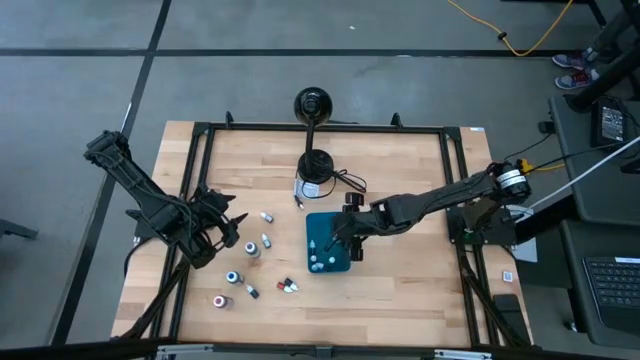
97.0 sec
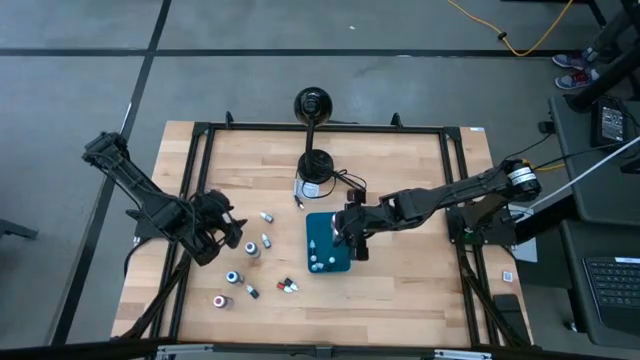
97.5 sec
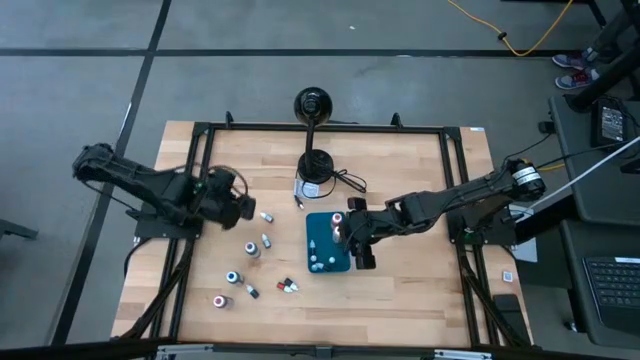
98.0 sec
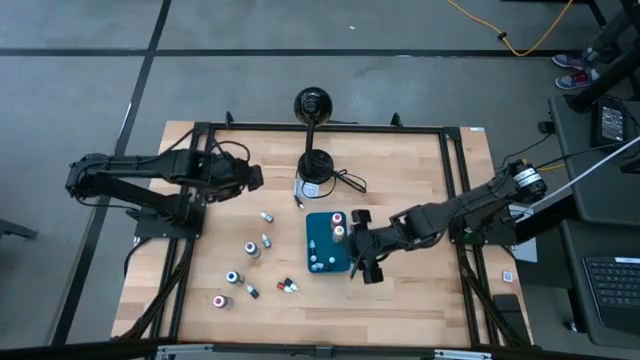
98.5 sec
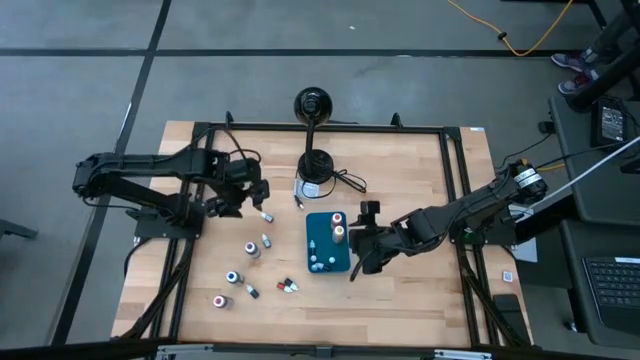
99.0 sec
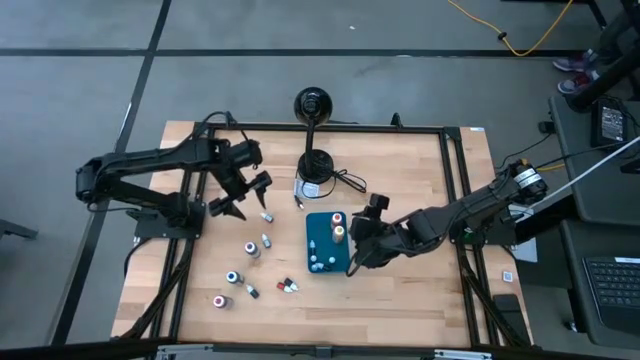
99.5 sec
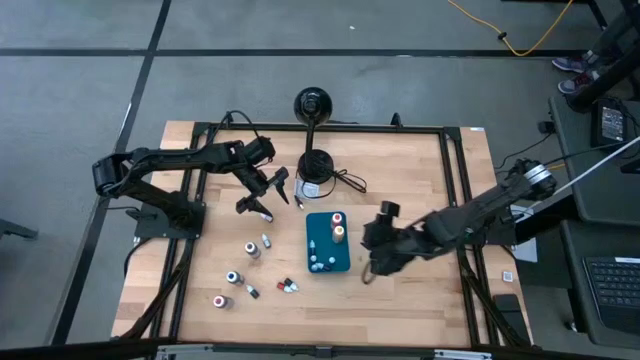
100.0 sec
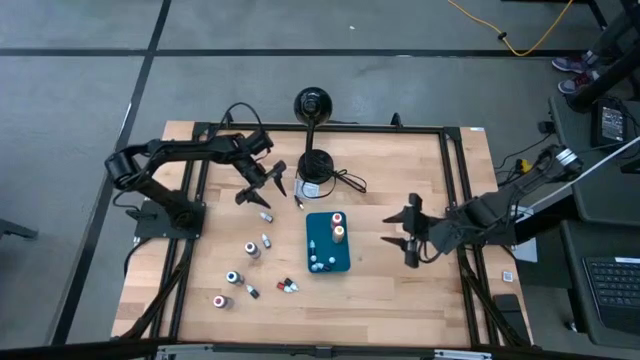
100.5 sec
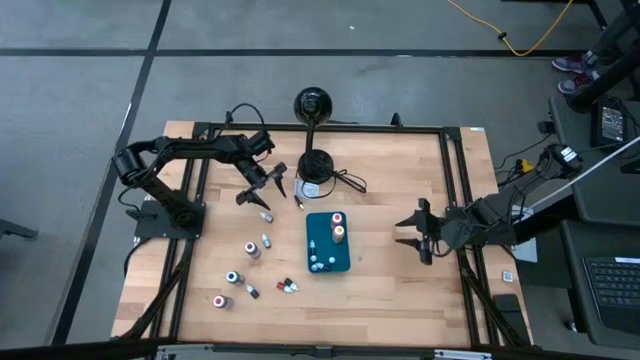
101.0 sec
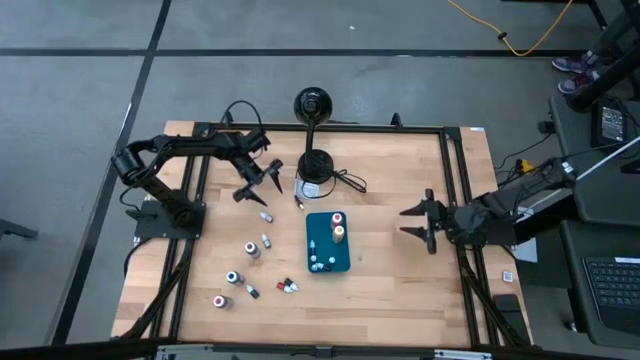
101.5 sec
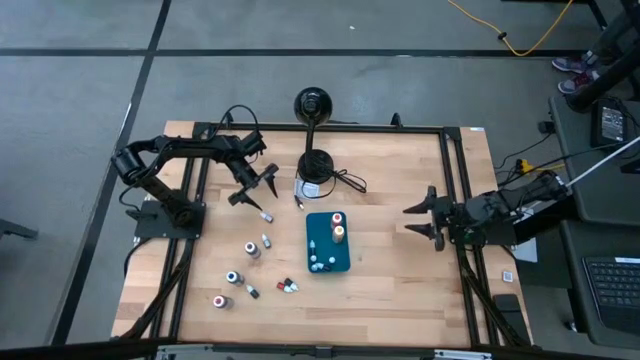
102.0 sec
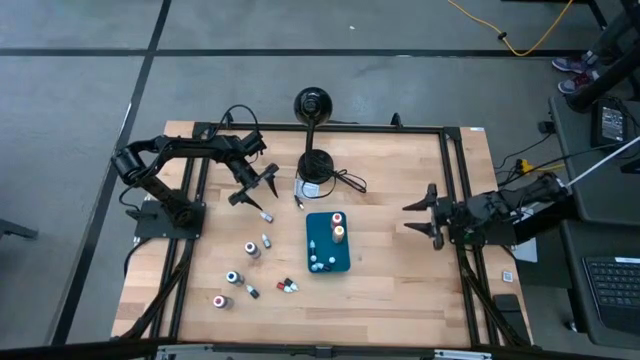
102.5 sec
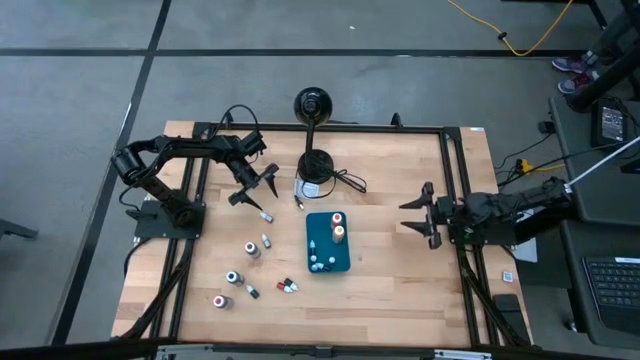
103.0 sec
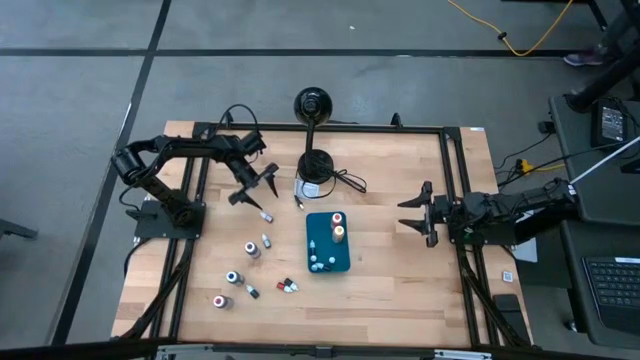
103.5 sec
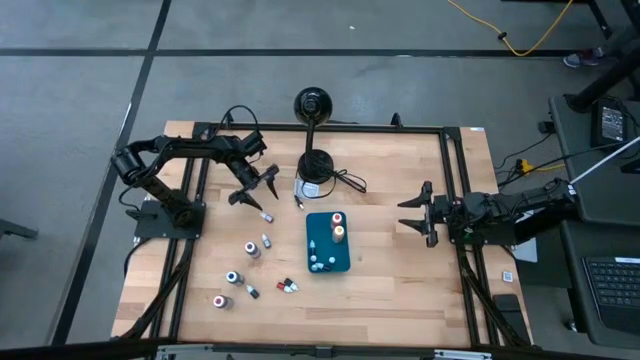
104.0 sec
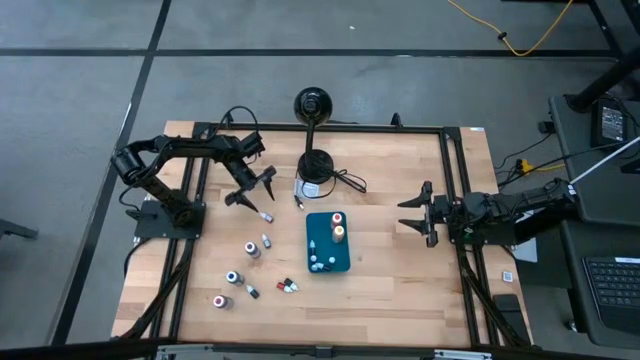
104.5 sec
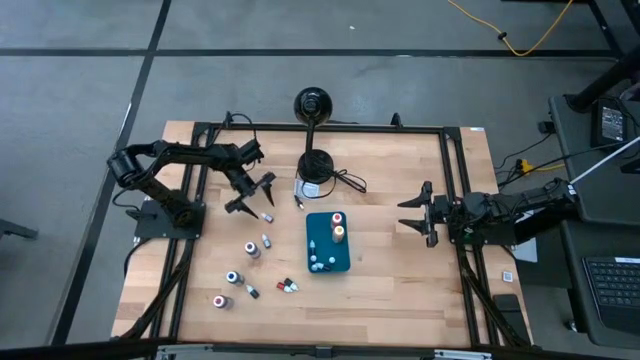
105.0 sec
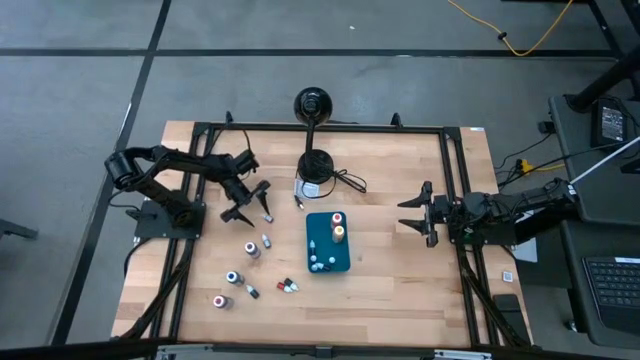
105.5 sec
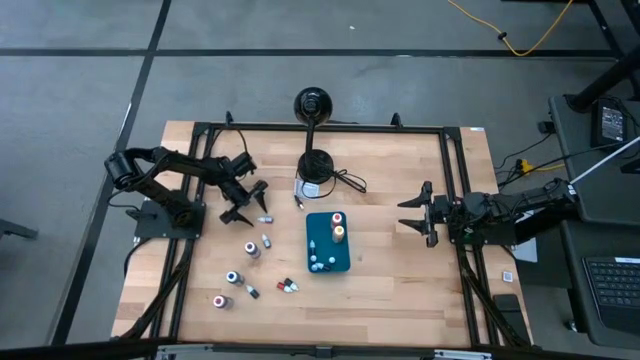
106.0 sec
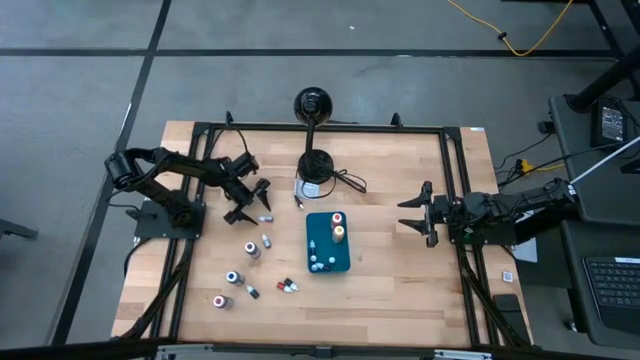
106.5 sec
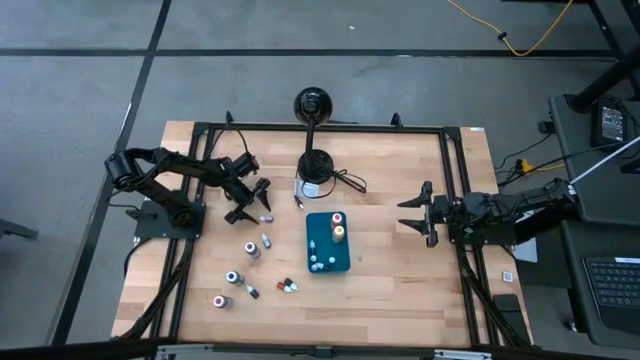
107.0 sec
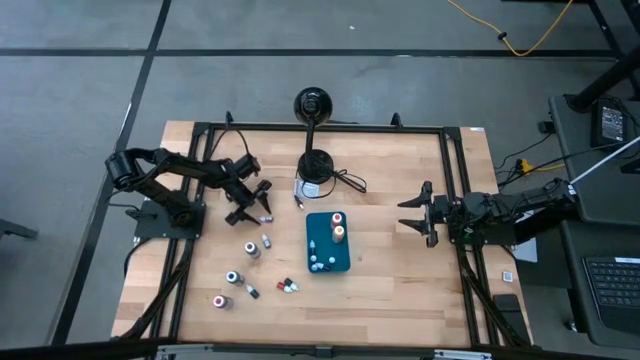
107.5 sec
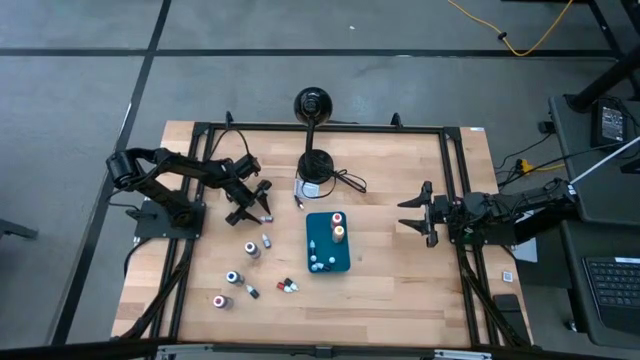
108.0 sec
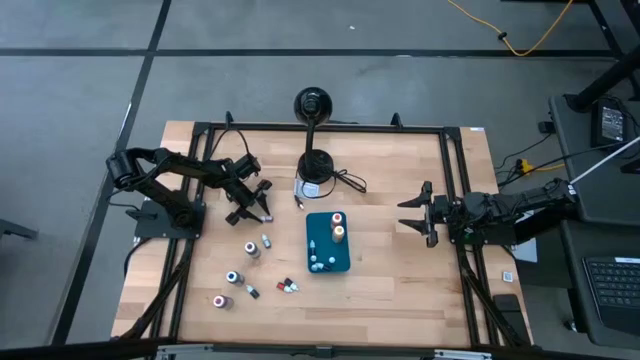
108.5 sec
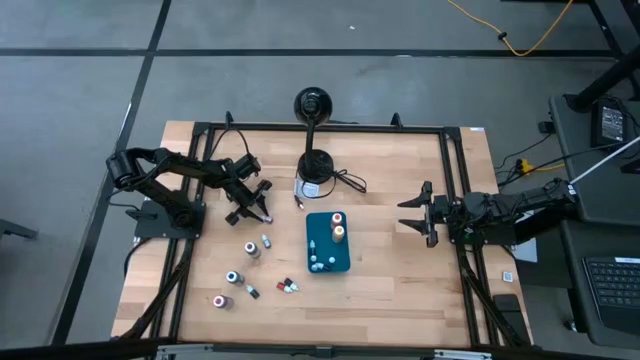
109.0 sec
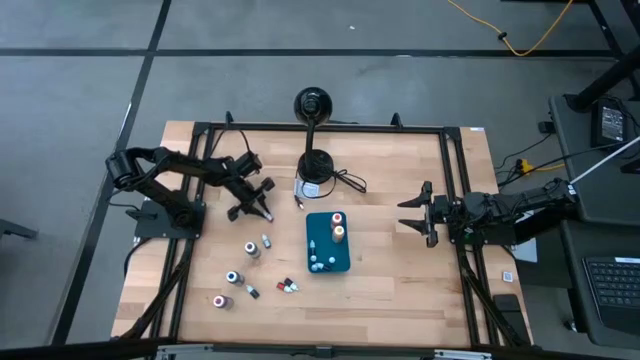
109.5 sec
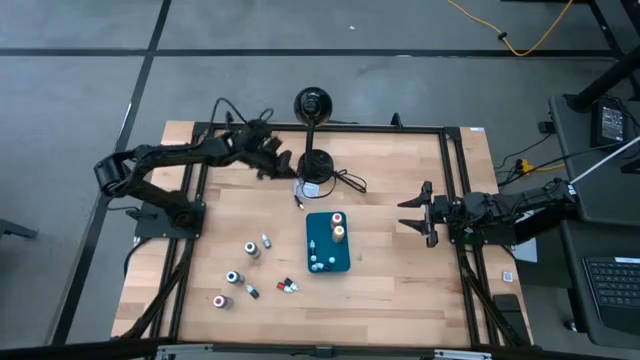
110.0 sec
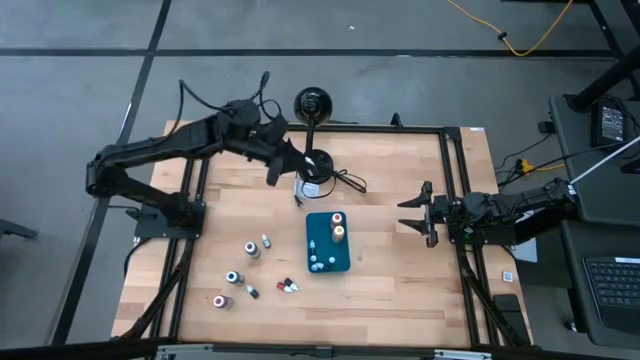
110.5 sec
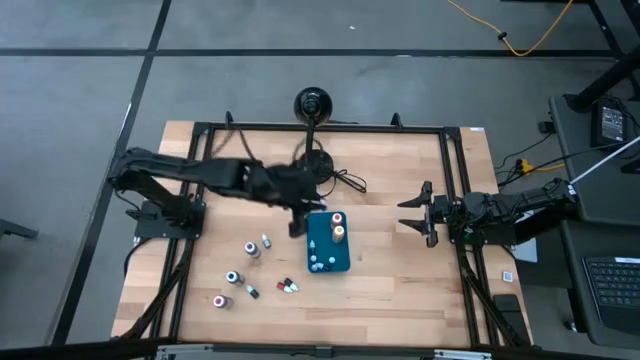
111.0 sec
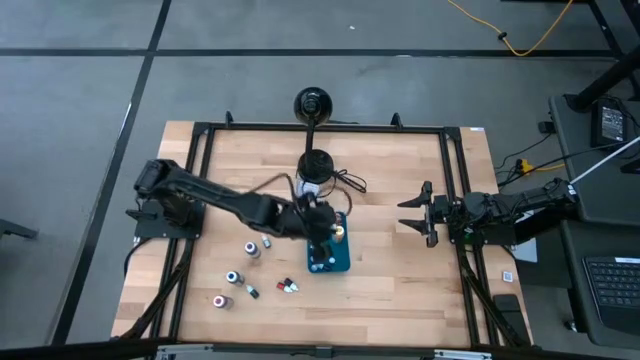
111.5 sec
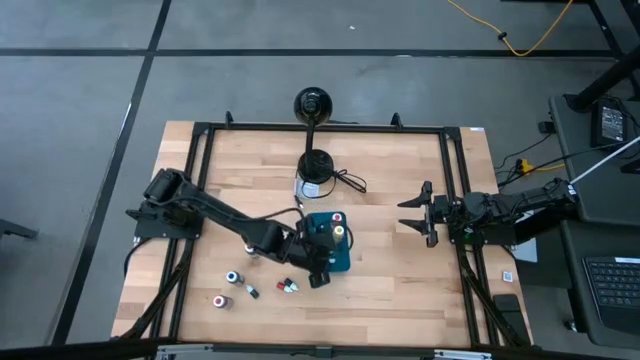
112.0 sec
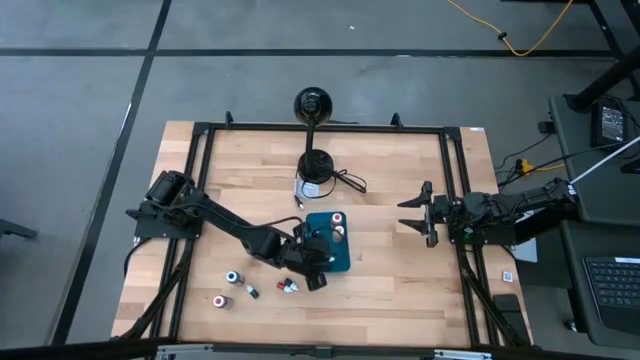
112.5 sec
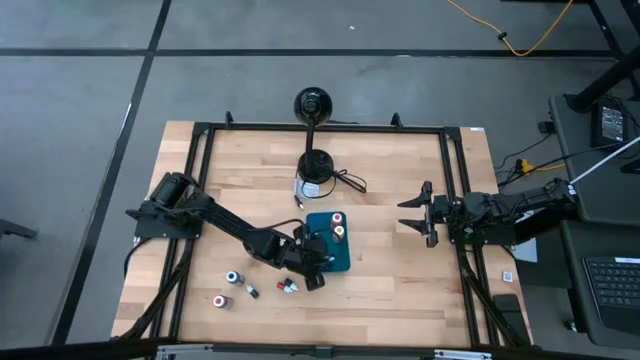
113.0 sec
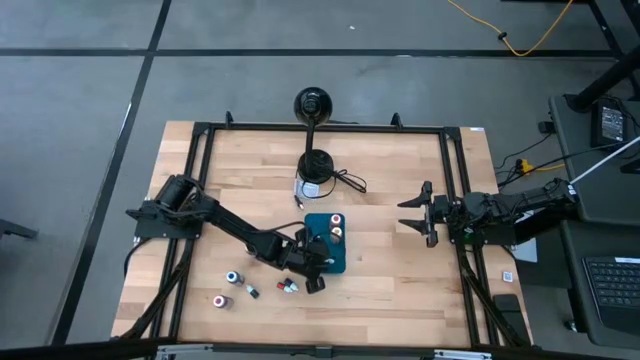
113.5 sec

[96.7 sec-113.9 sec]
Task: Pick & Place food coloring
Put the top red small food coloring bottle into the bin

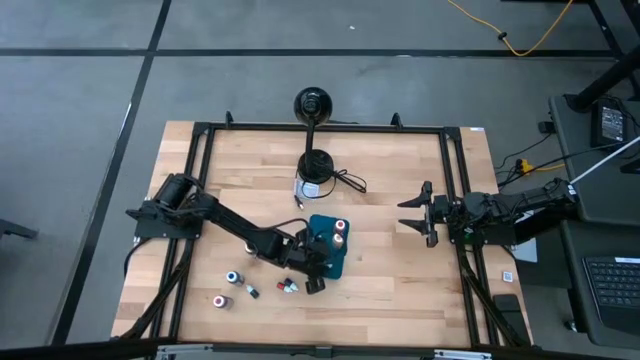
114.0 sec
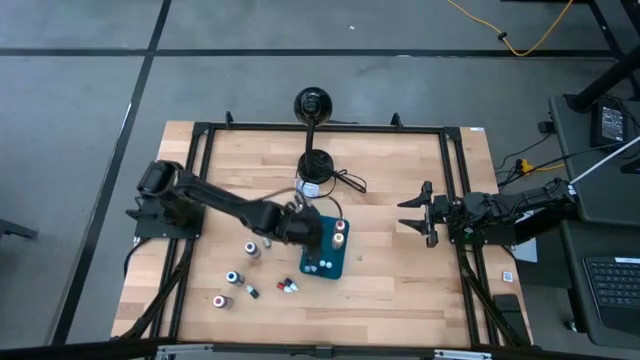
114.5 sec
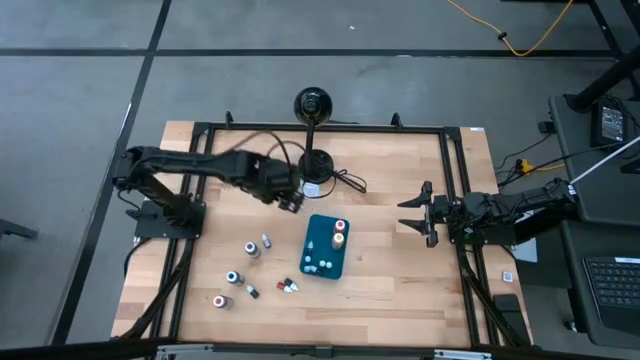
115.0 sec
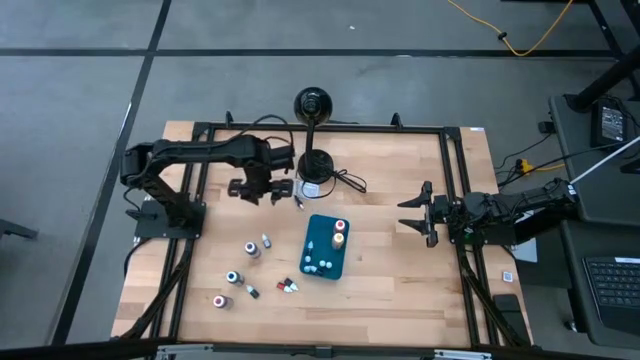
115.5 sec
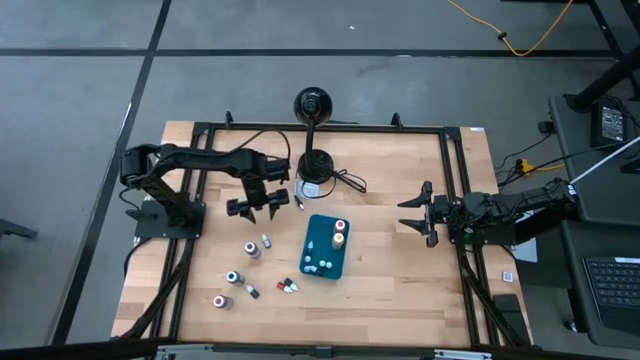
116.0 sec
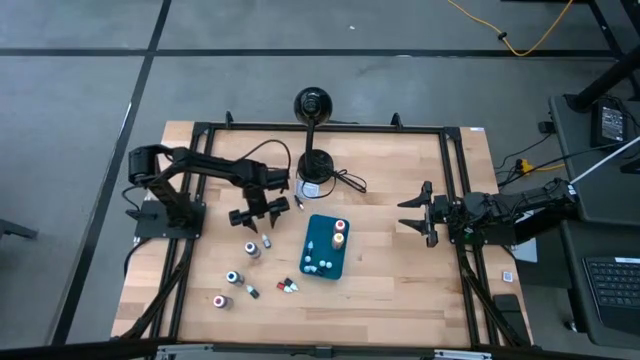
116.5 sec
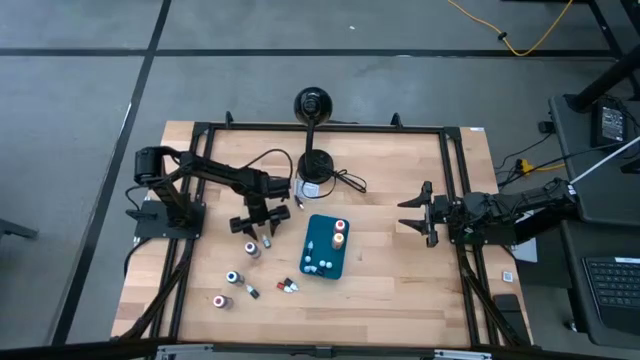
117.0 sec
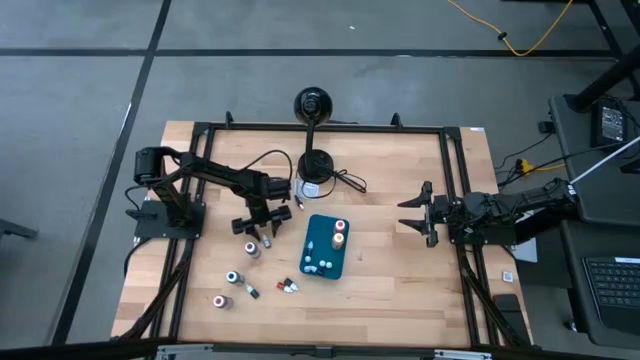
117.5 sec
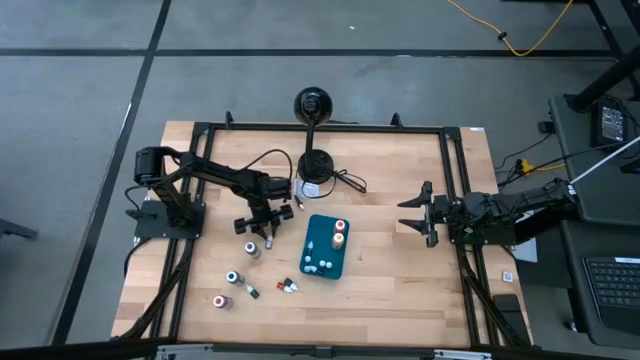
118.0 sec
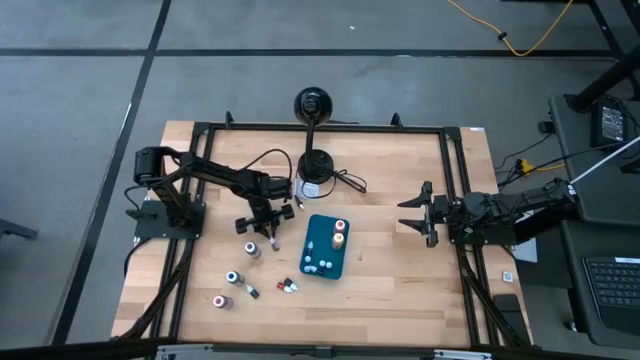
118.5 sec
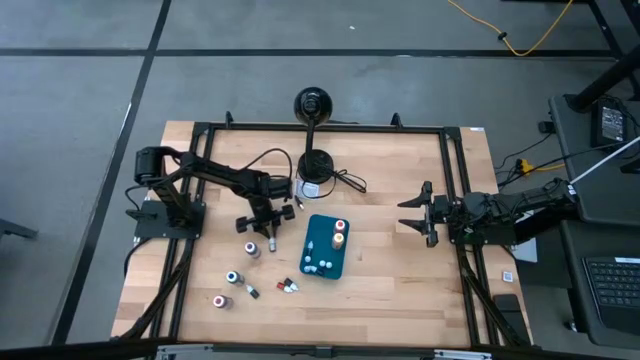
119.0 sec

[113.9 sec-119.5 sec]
Put the brown small food coloring bottle into the bin
